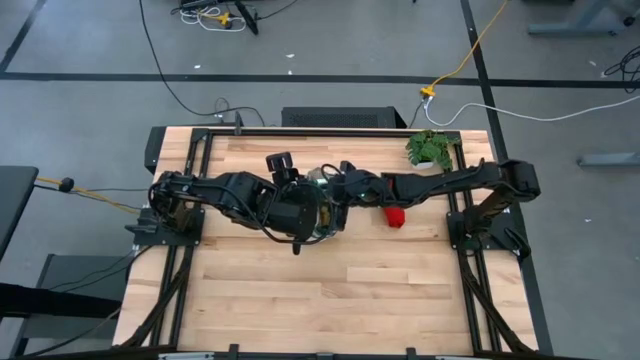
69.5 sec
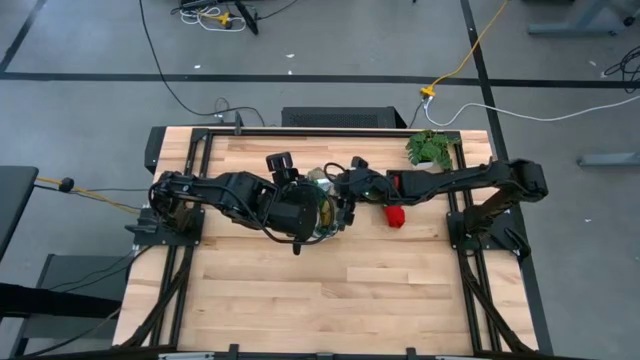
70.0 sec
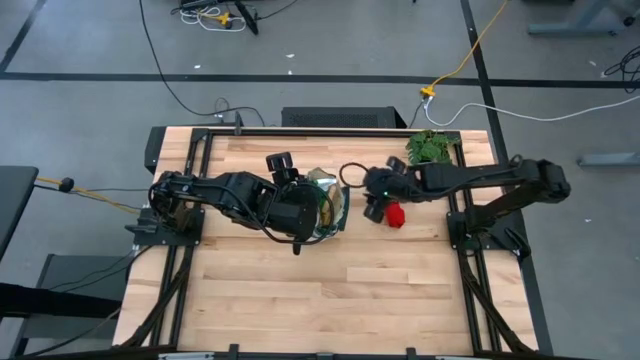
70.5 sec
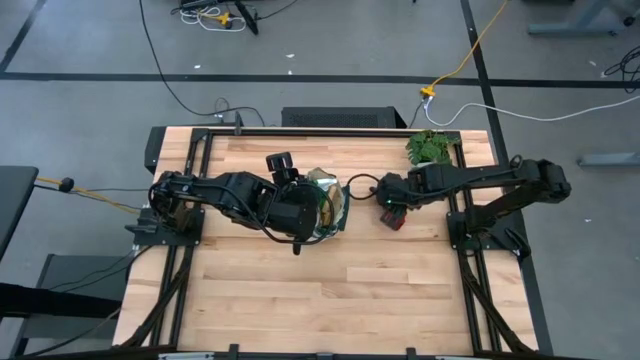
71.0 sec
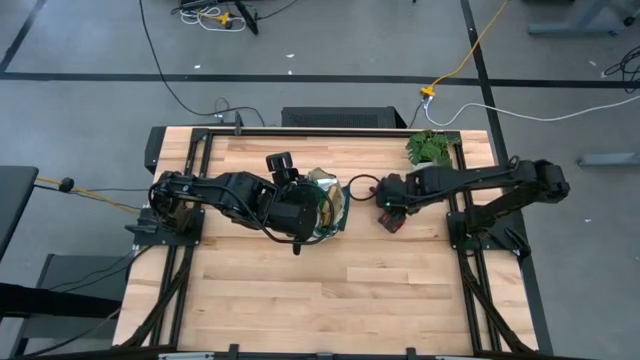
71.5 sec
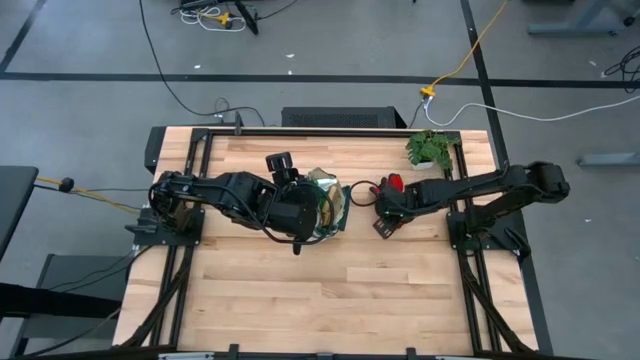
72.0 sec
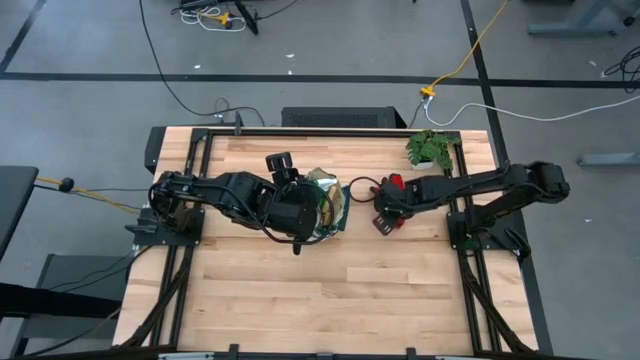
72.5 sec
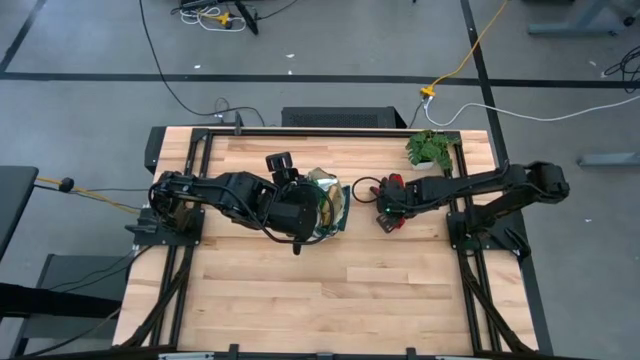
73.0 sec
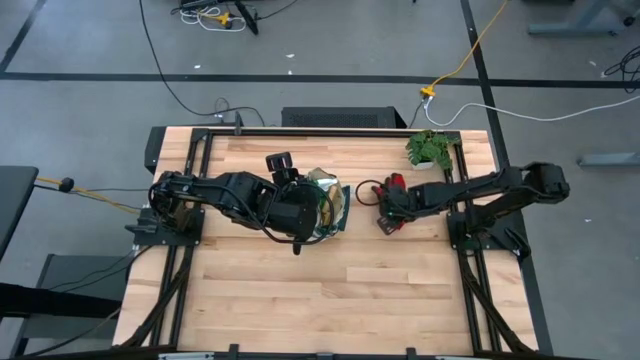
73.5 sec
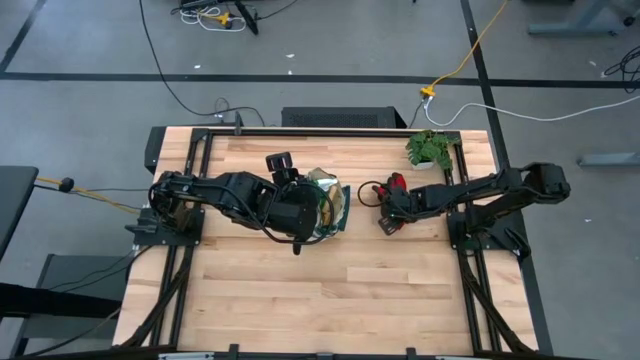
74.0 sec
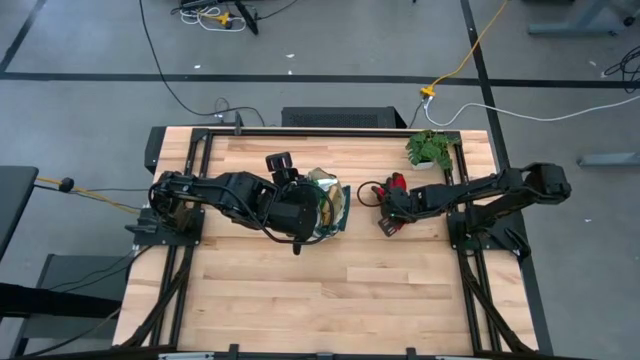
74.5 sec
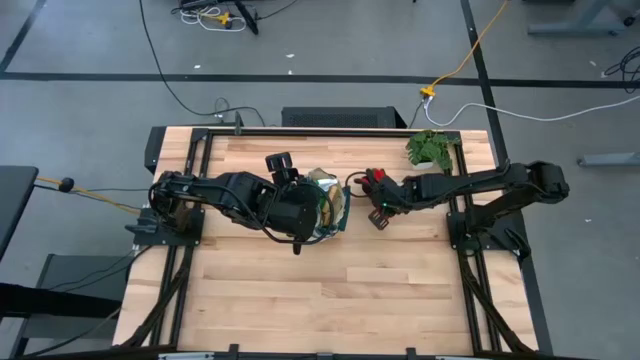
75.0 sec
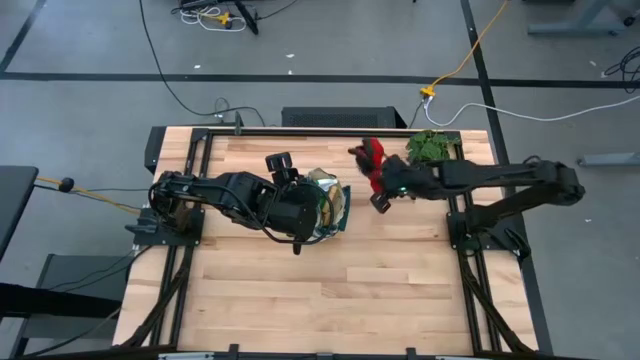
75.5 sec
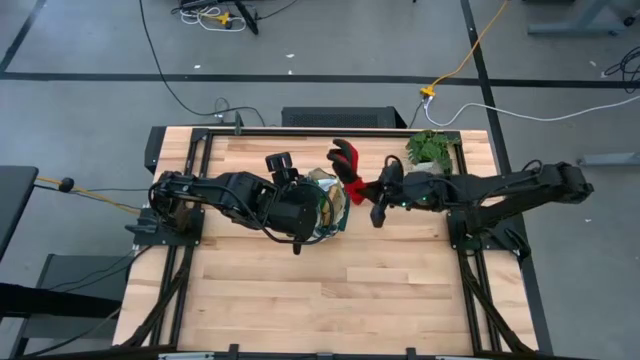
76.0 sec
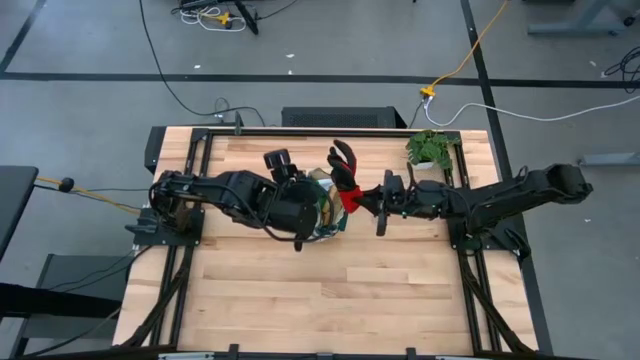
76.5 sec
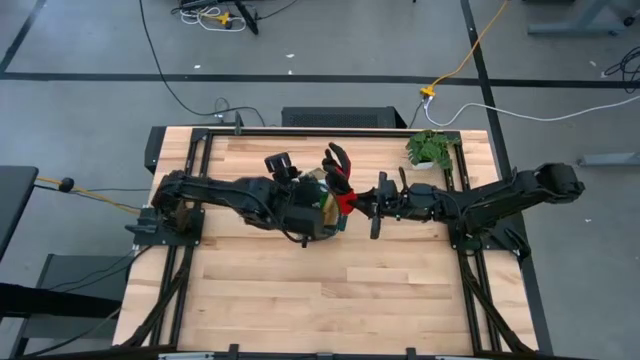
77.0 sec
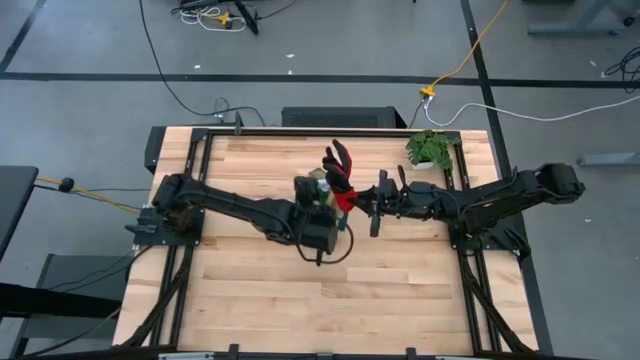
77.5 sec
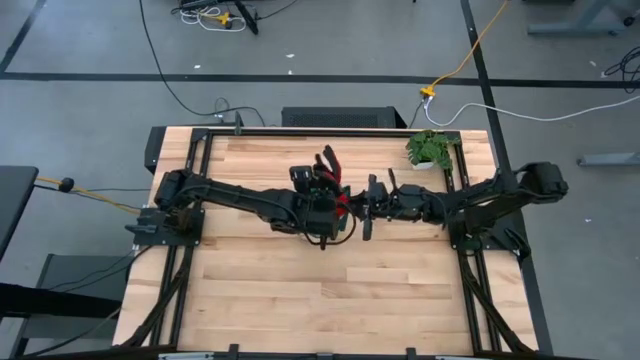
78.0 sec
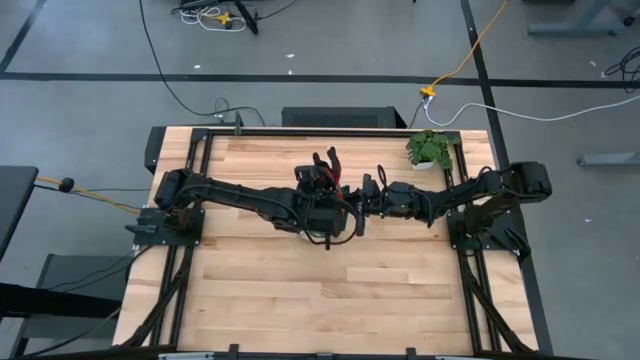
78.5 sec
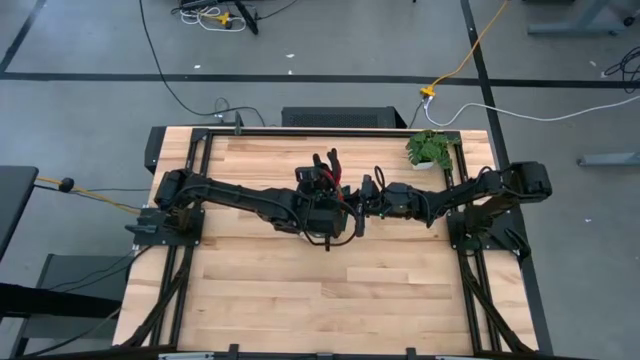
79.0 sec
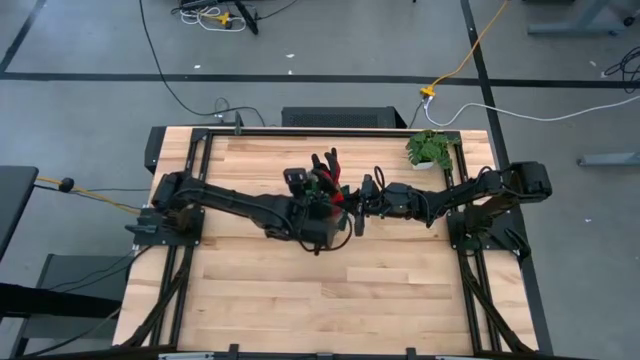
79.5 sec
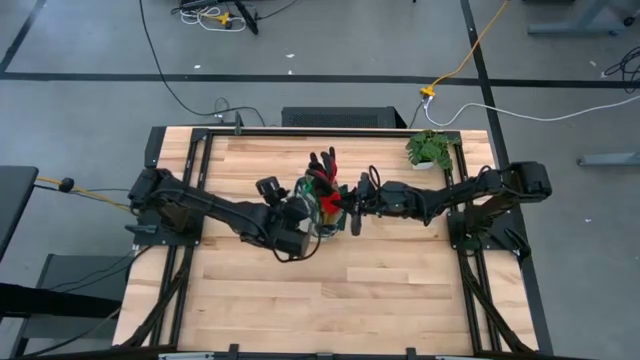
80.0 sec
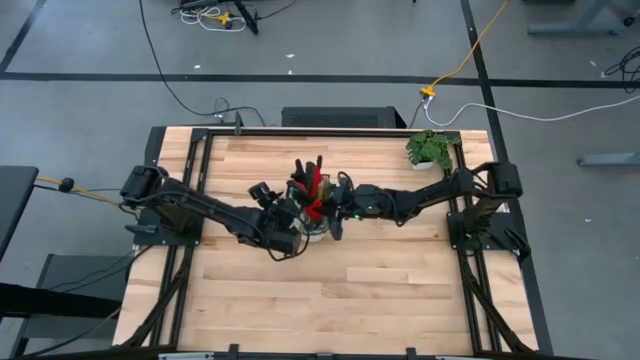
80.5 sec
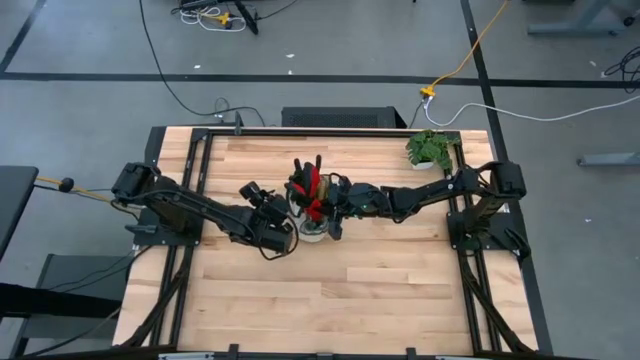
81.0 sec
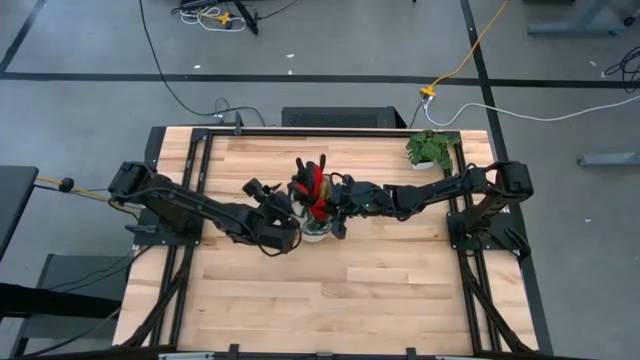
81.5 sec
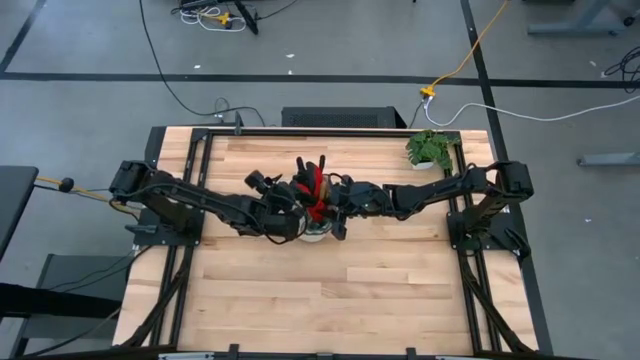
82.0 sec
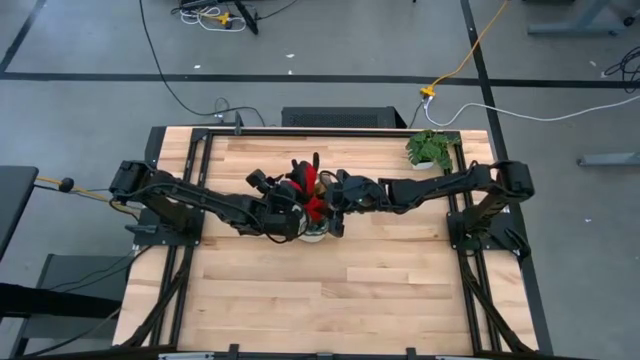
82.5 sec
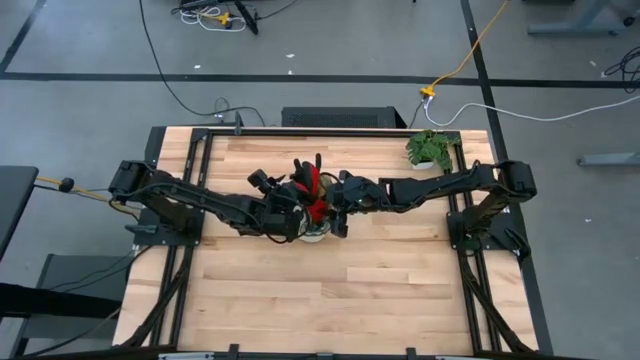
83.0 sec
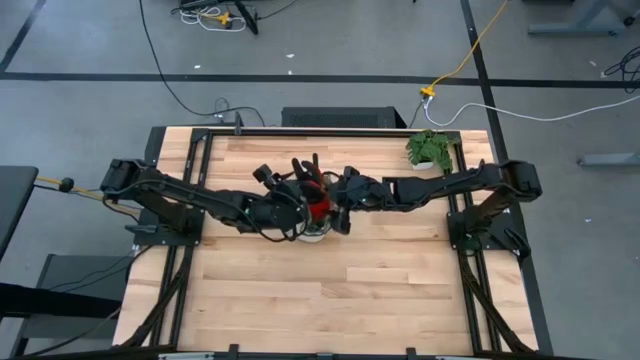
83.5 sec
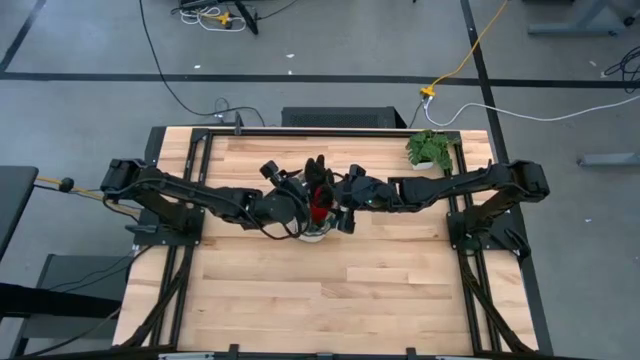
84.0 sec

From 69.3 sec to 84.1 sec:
Task: Pick & Place Garden tools in Gardening bag
Put the red gloves into the brown gardening bag

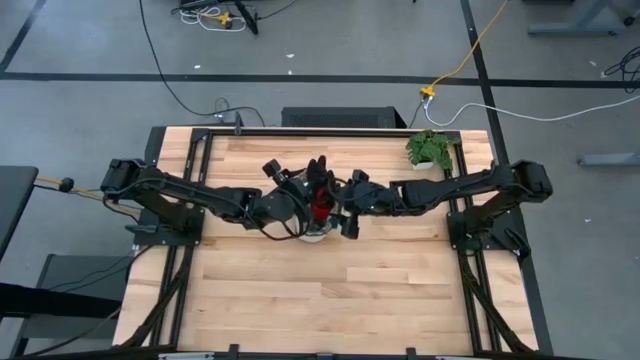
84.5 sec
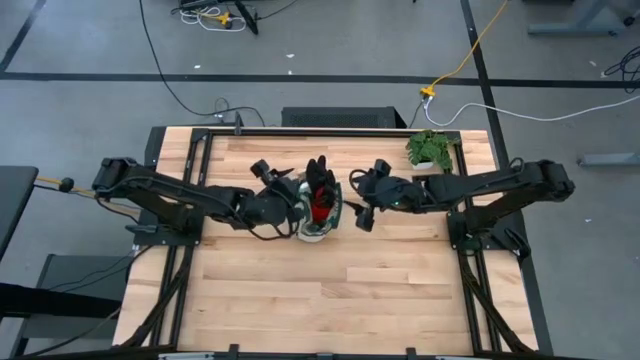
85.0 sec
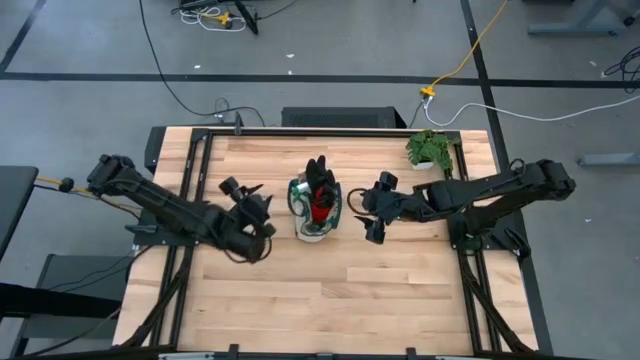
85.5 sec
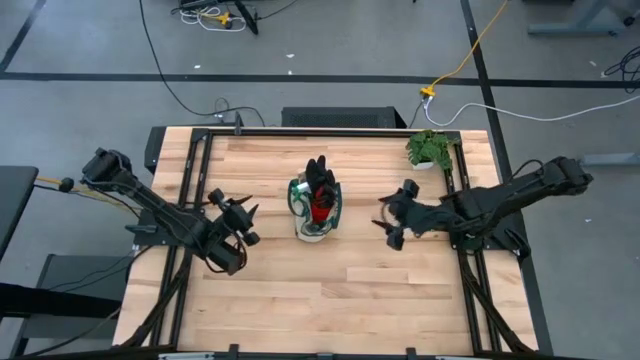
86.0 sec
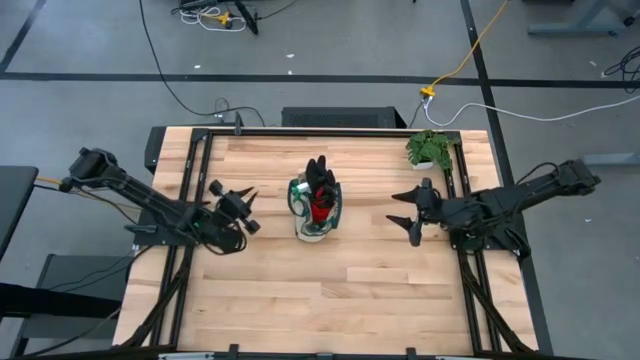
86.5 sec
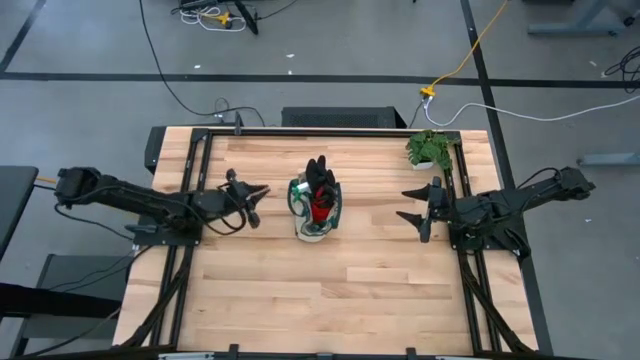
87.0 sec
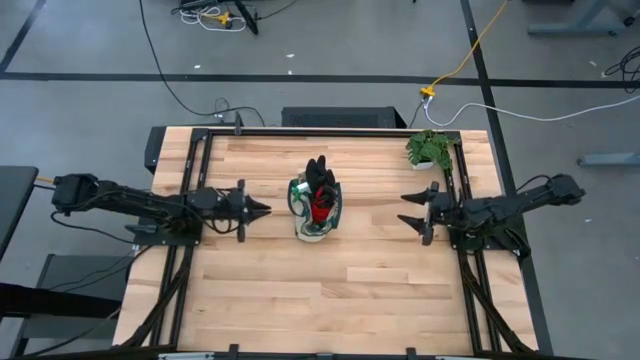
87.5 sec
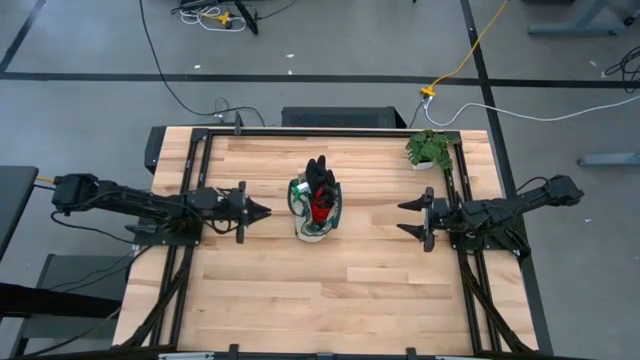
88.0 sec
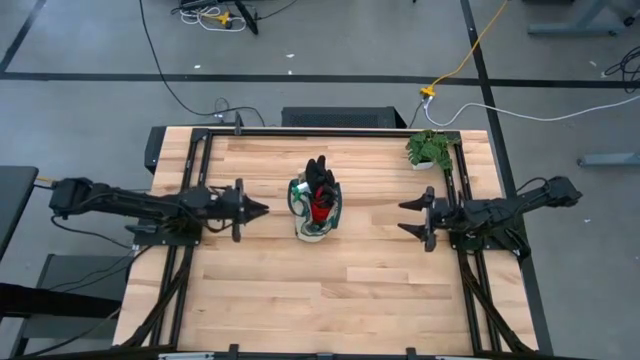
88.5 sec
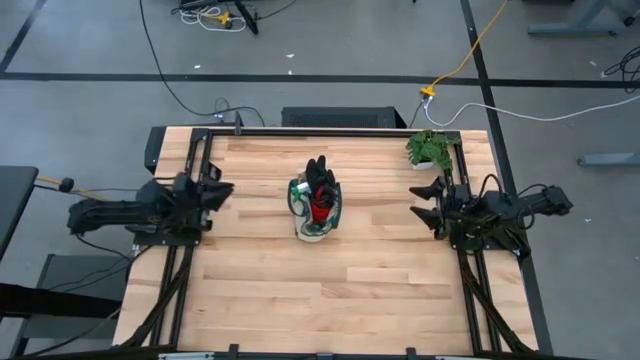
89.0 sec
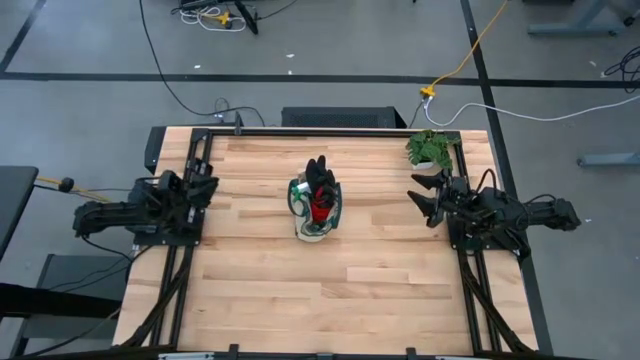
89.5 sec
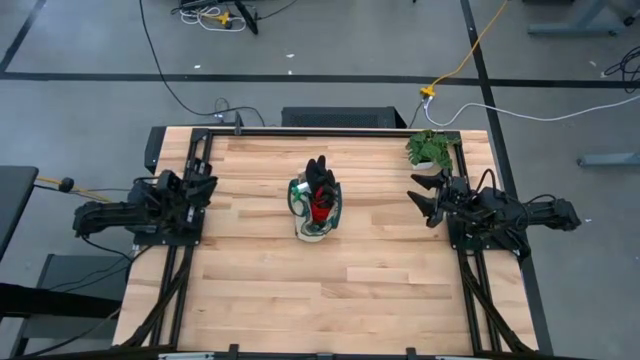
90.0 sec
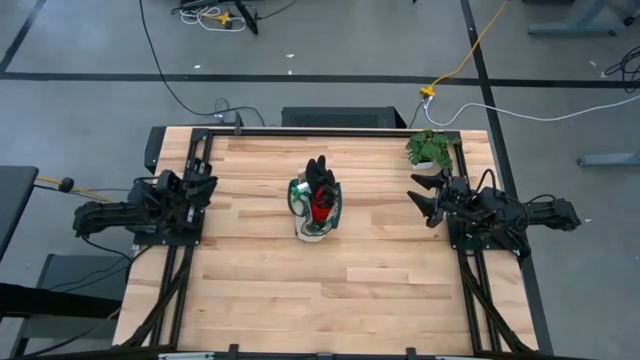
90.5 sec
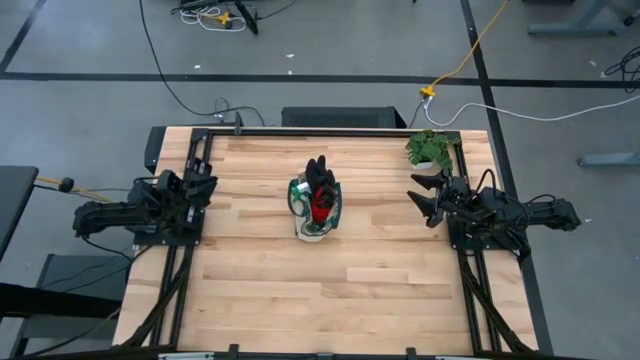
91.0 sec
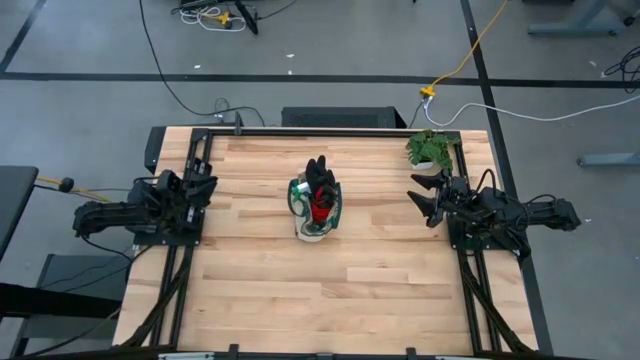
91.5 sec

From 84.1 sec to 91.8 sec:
Return to Home Position
